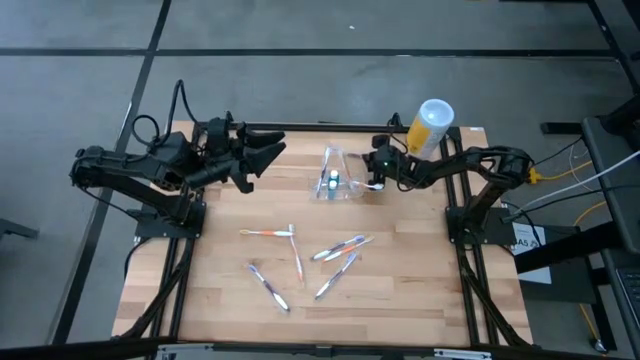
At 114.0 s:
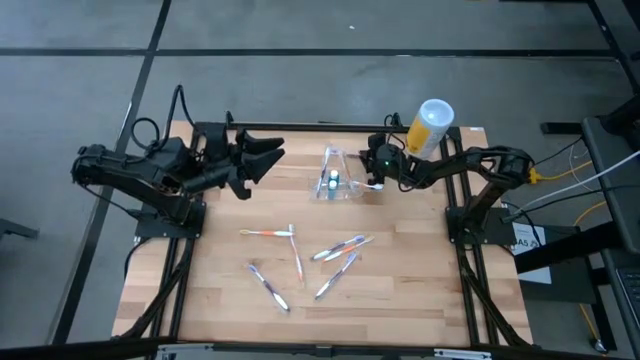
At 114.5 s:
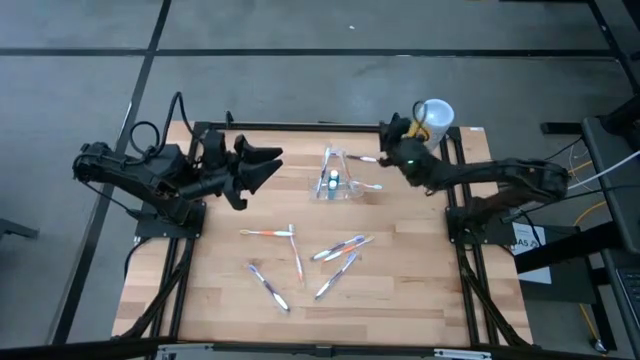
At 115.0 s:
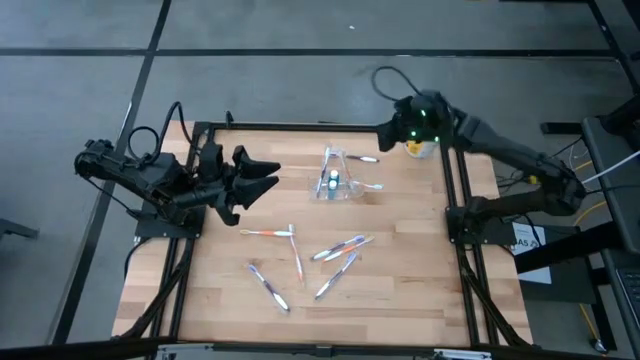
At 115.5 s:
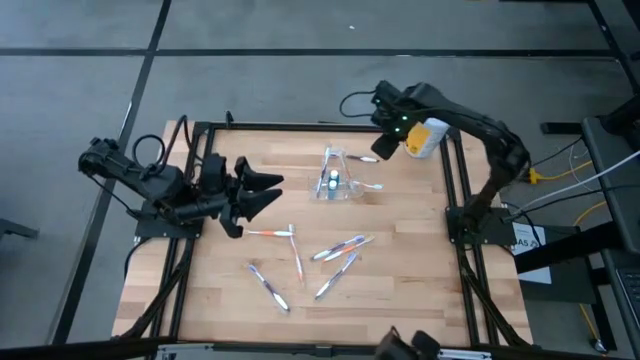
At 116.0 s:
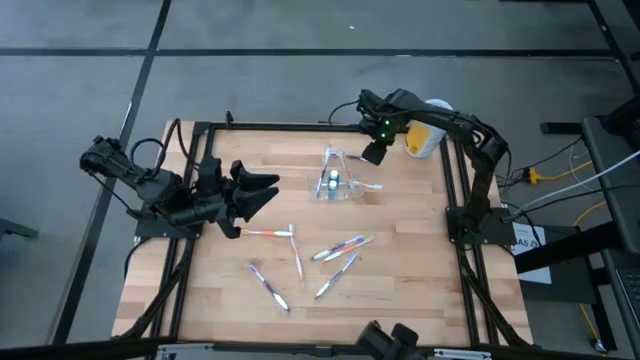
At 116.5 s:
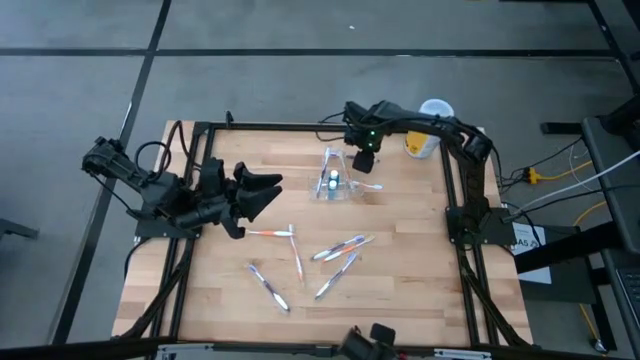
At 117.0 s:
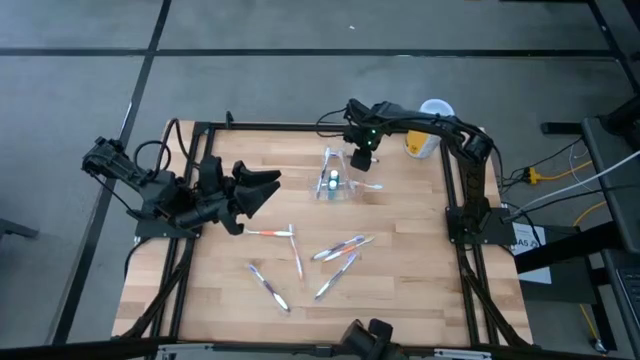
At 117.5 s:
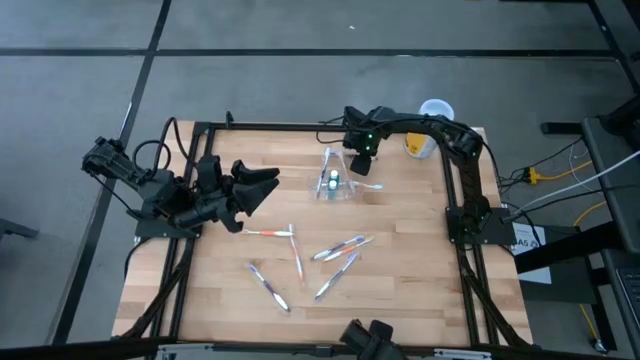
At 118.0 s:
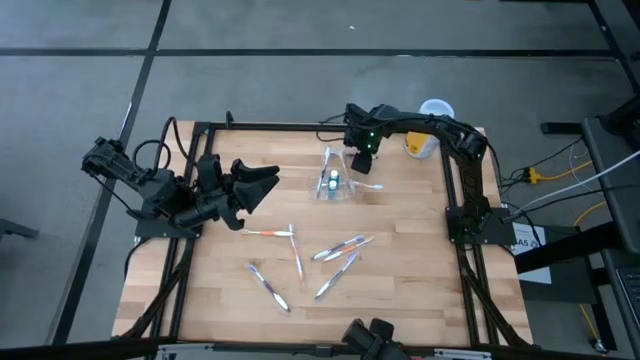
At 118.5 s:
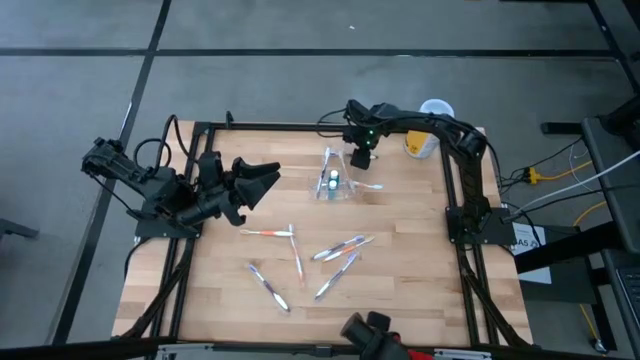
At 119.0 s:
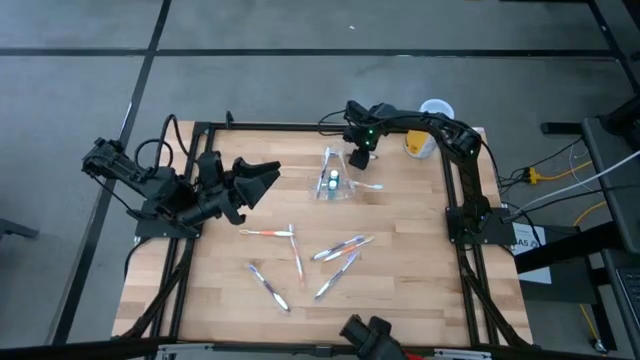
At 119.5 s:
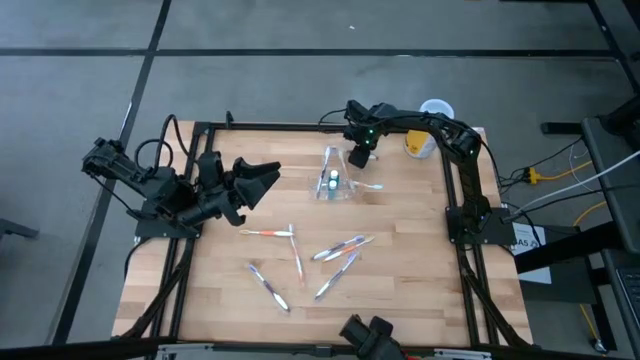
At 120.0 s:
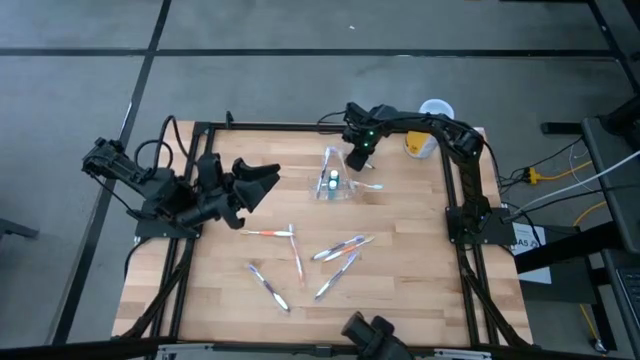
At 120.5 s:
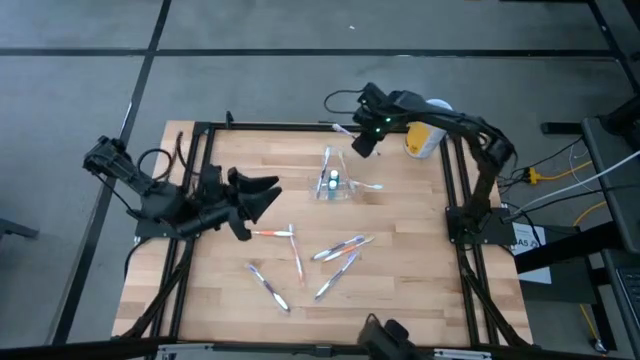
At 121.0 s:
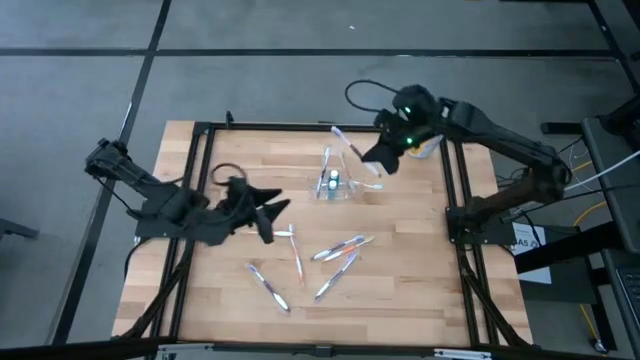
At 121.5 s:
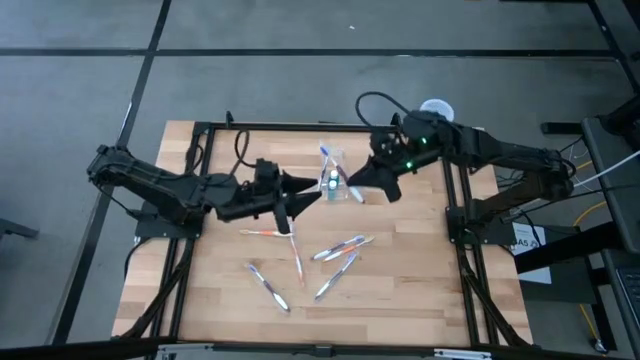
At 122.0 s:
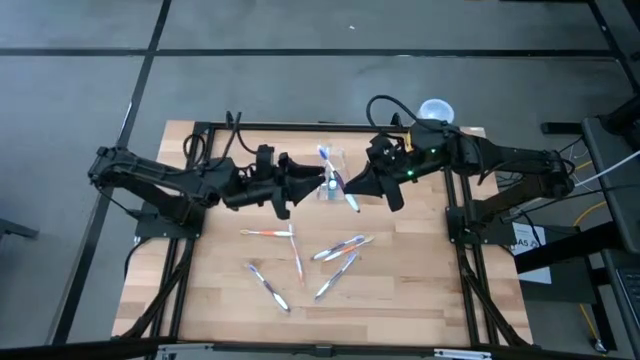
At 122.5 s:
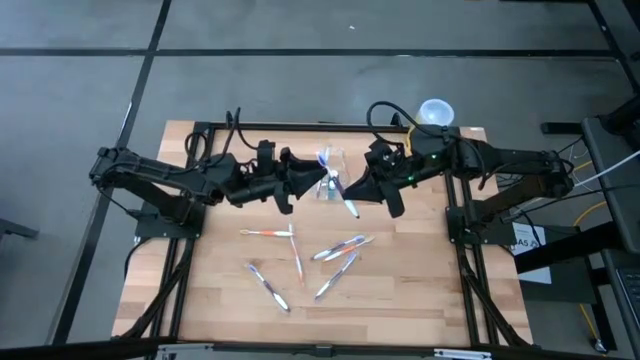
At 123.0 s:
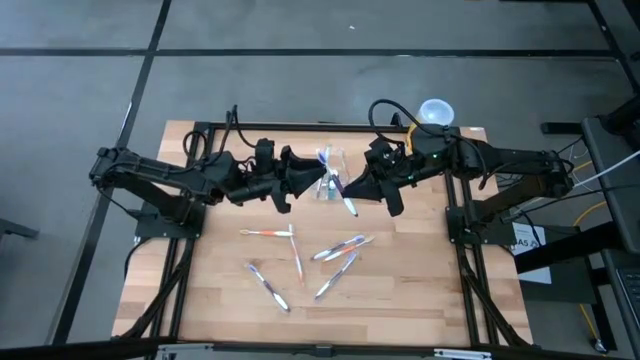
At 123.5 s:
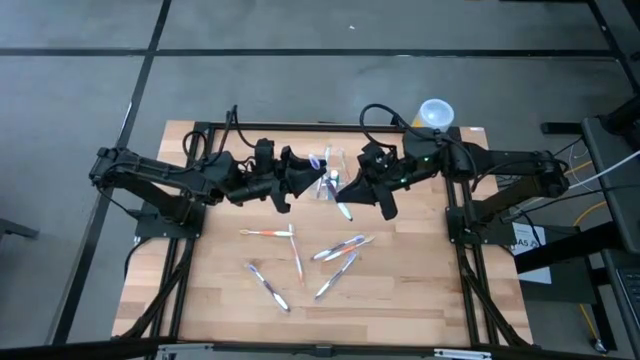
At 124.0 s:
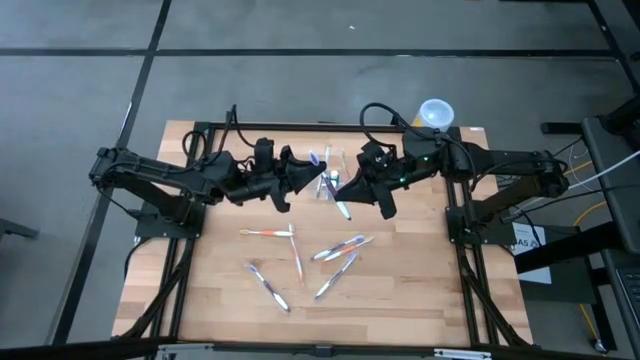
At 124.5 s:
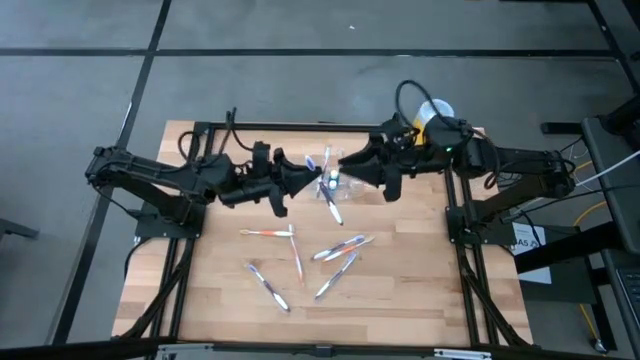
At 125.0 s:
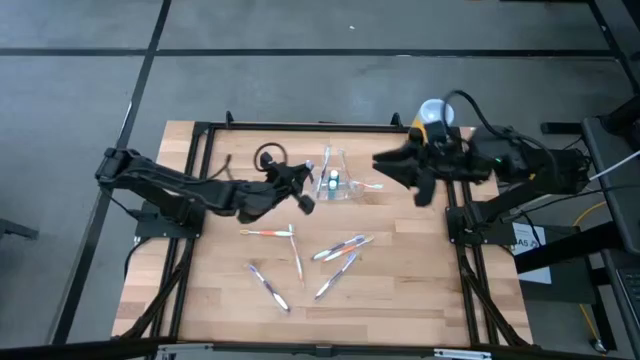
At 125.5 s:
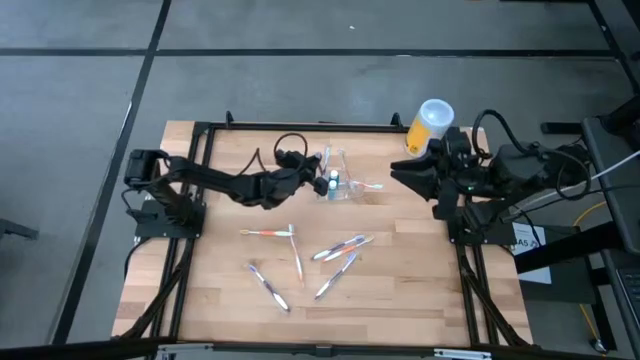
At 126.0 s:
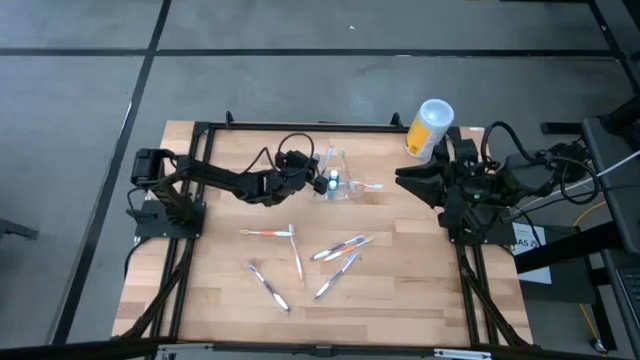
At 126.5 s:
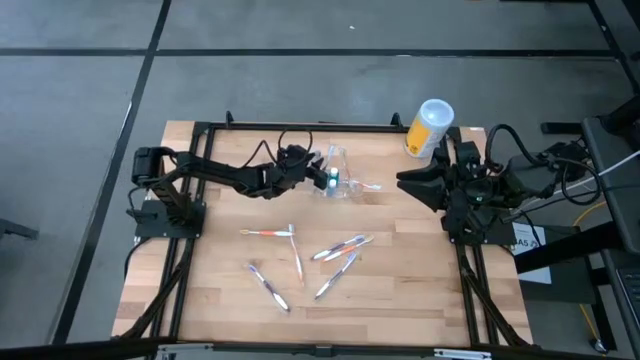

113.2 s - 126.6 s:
Task: Pick & Place toothbrushing station
Put the purple toothbrush into the left section of the transparent organizer

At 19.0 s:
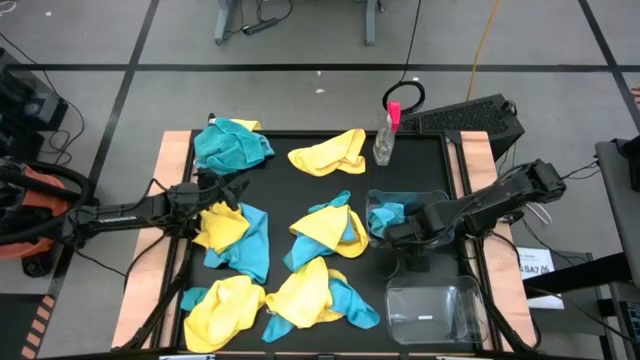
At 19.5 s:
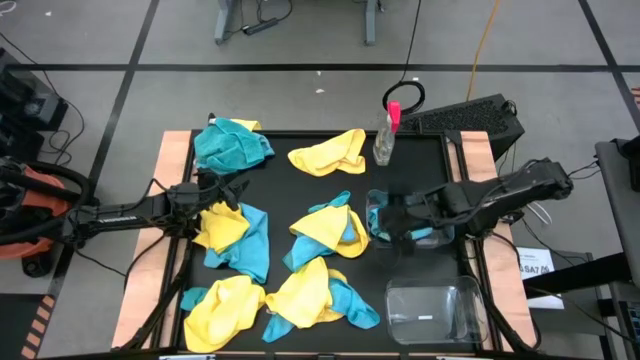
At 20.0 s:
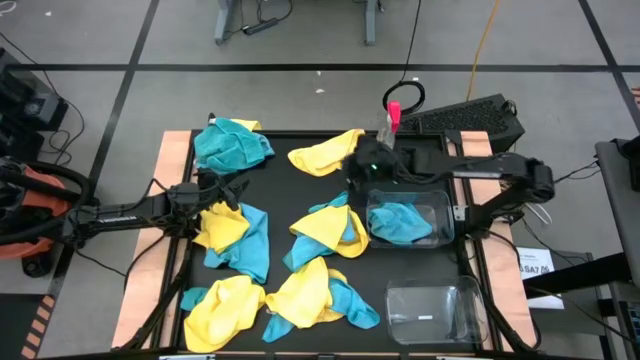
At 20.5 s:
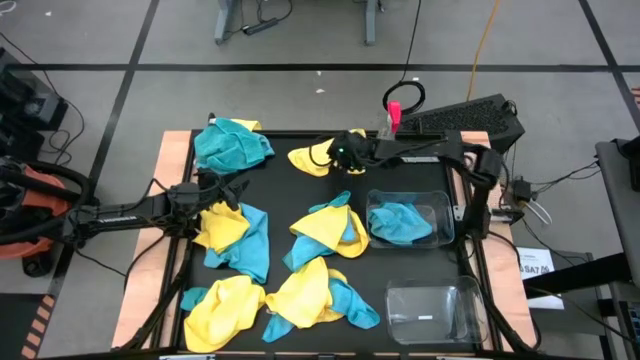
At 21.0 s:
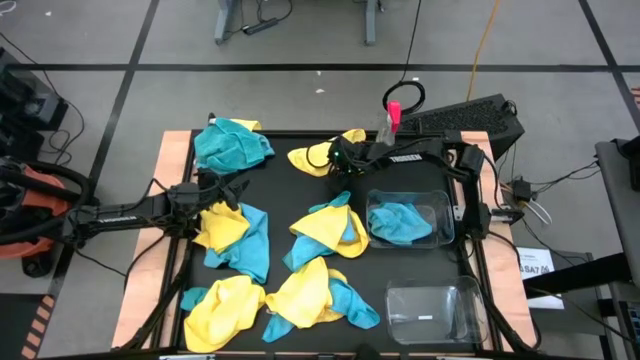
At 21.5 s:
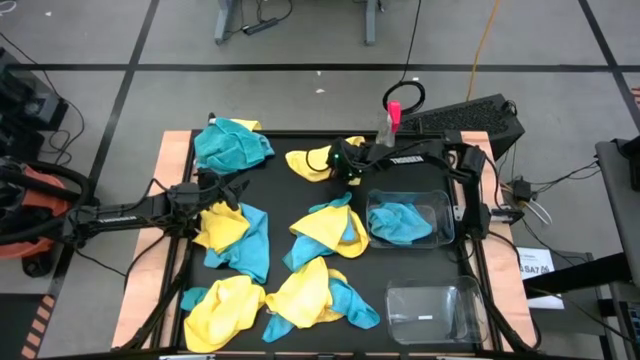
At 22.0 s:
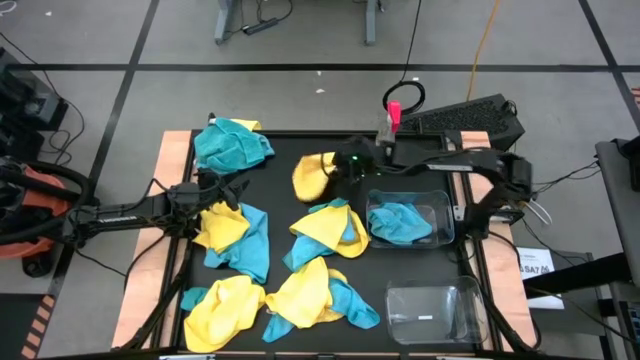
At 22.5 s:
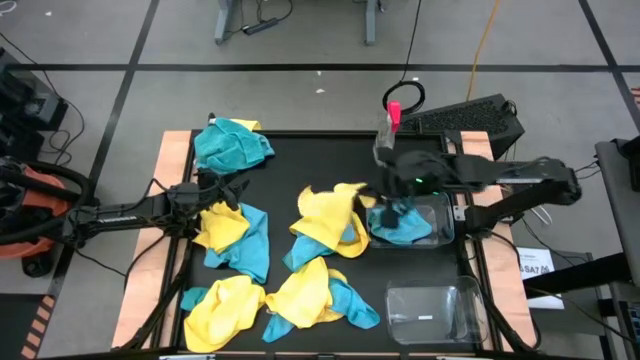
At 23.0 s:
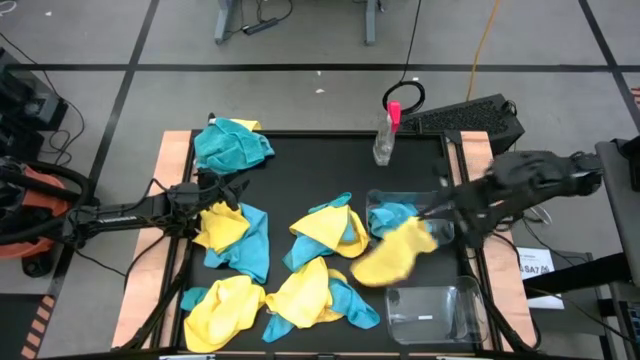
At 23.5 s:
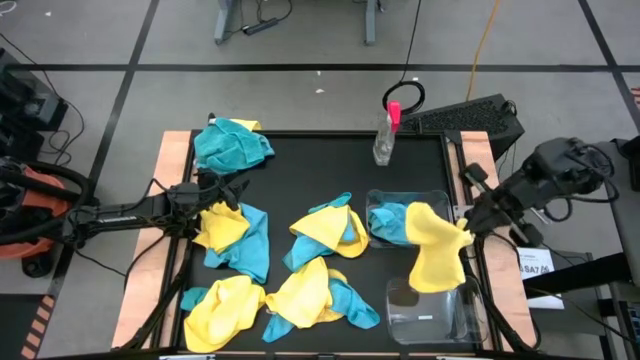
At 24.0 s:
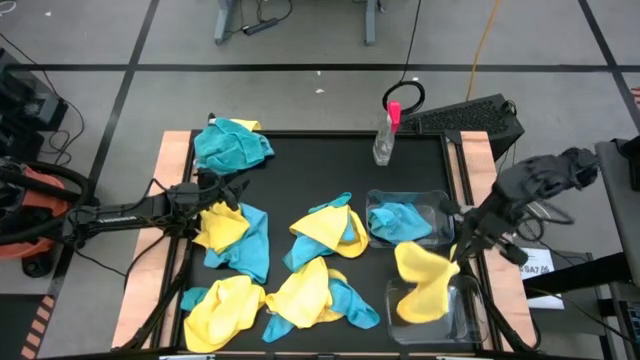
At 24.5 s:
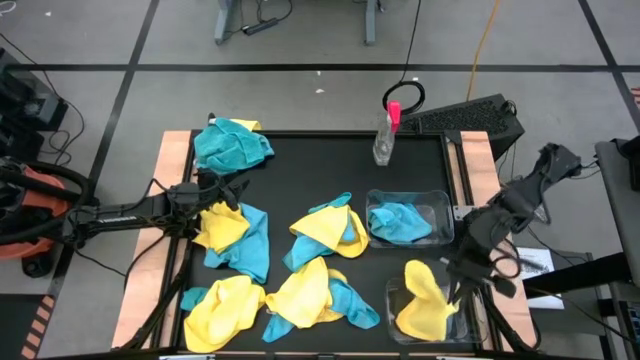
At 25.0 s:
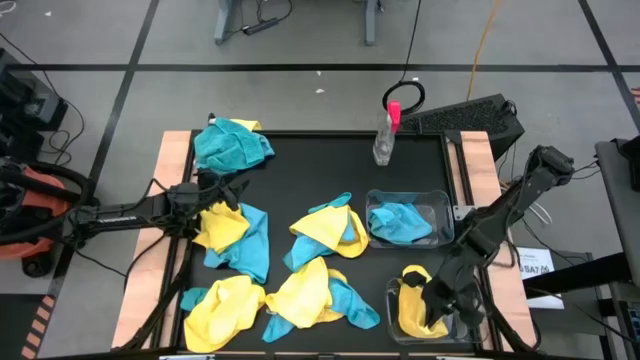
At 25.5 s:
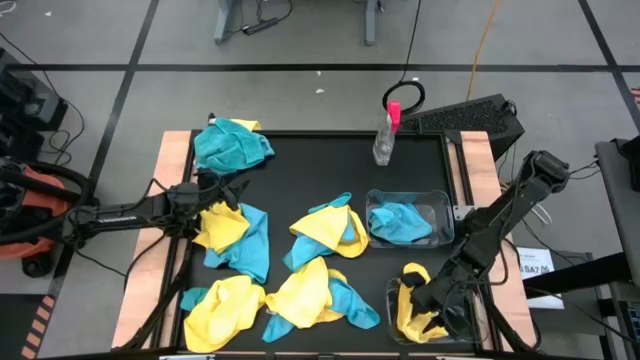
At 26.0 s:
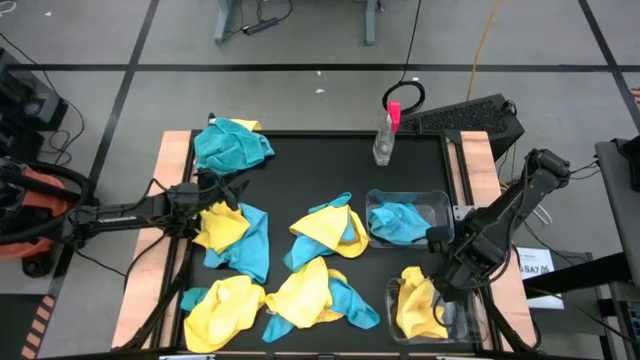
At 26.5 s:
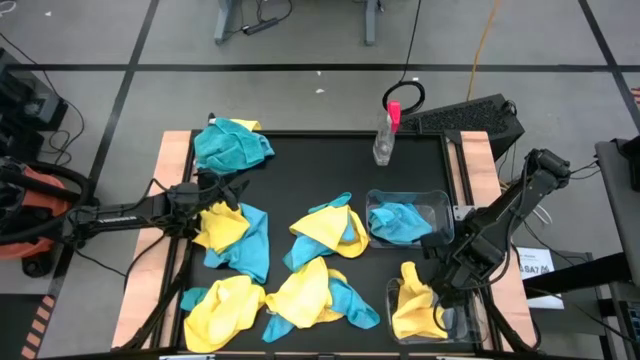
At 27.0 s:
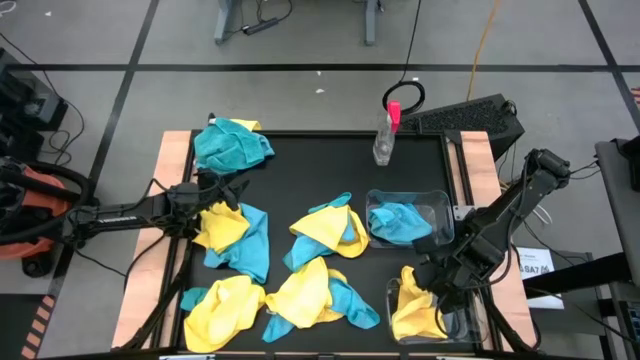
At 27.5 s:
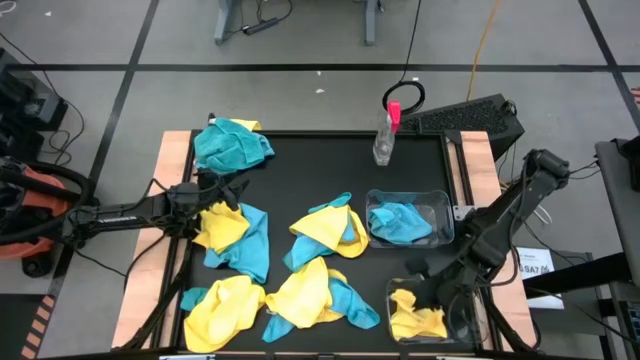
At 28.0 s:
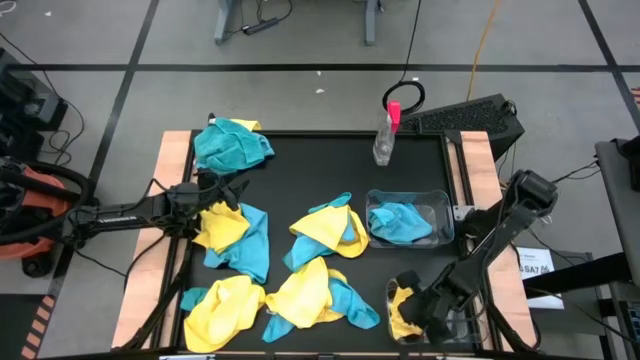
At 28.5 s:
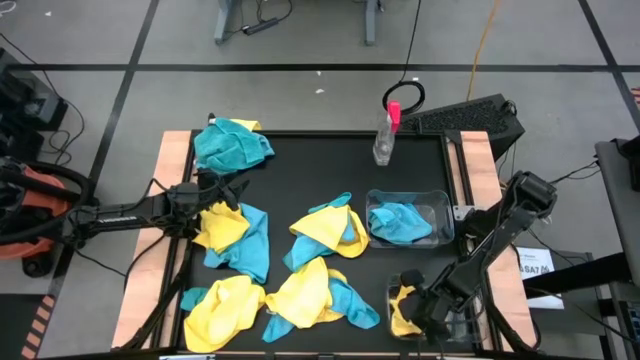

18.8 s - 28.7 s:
Task: Sort microfiber towel by color & place in baskets
Put the yellow towel into the bottom transparent bin
